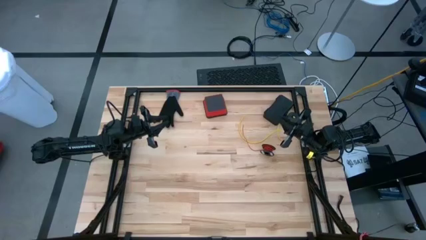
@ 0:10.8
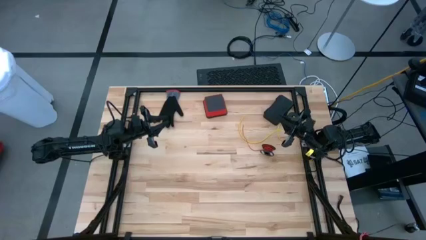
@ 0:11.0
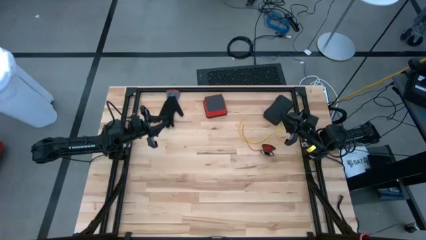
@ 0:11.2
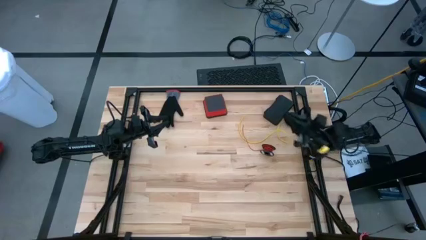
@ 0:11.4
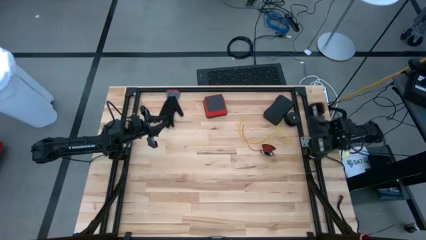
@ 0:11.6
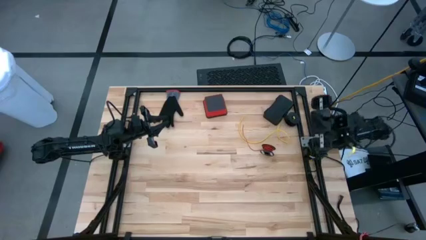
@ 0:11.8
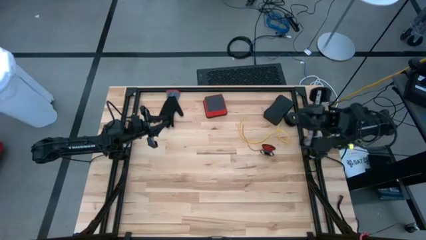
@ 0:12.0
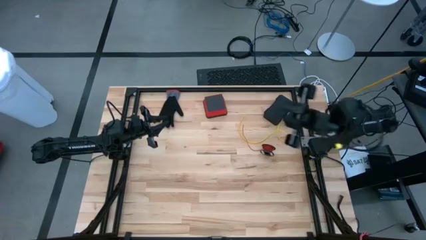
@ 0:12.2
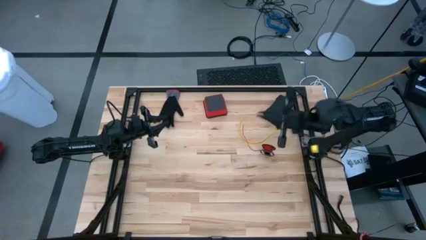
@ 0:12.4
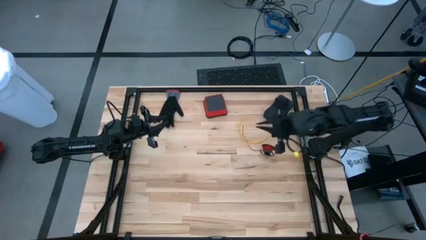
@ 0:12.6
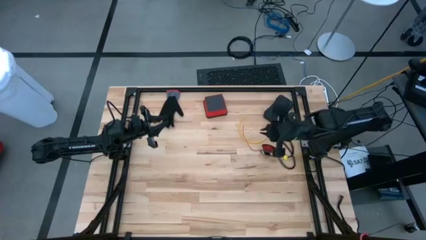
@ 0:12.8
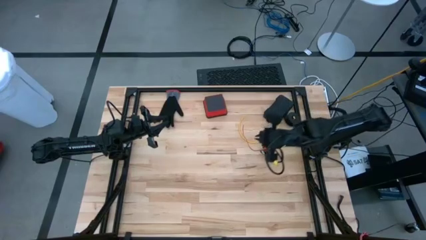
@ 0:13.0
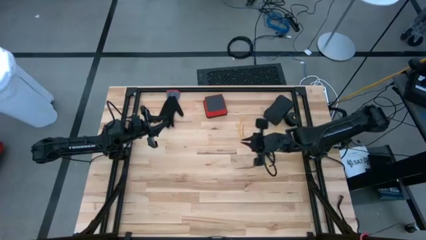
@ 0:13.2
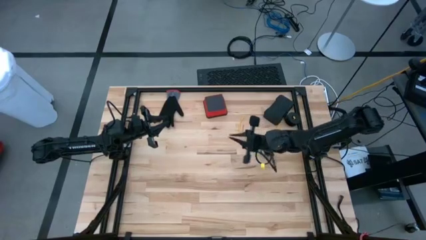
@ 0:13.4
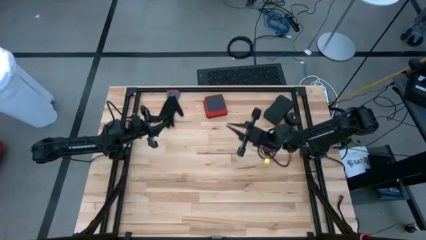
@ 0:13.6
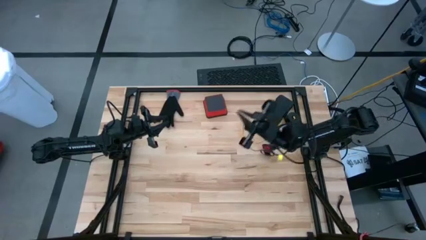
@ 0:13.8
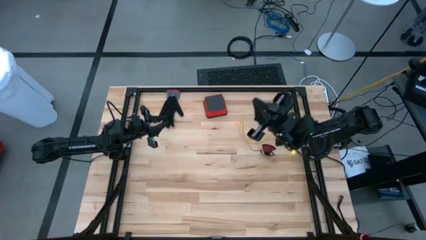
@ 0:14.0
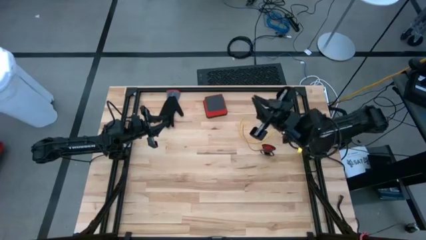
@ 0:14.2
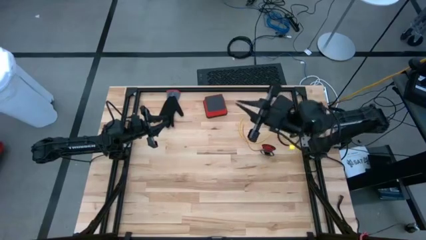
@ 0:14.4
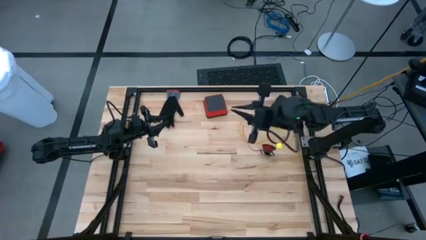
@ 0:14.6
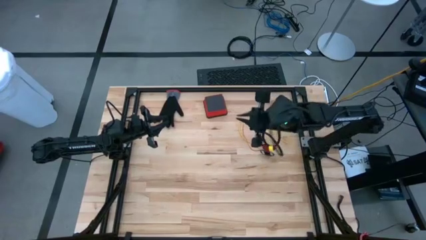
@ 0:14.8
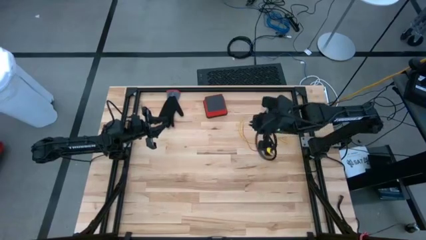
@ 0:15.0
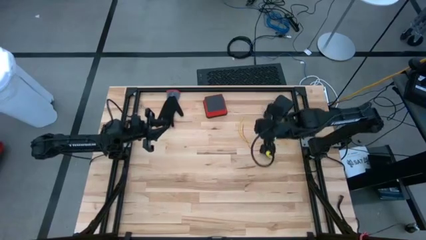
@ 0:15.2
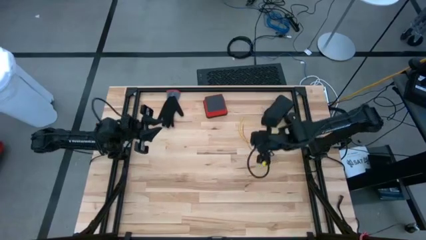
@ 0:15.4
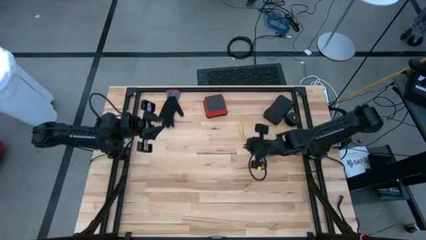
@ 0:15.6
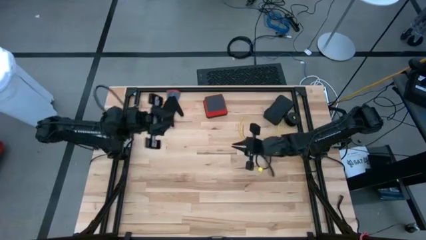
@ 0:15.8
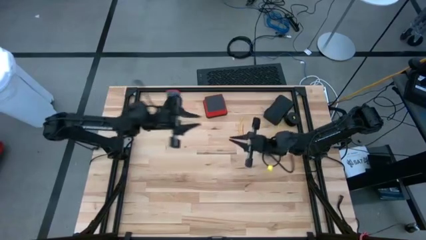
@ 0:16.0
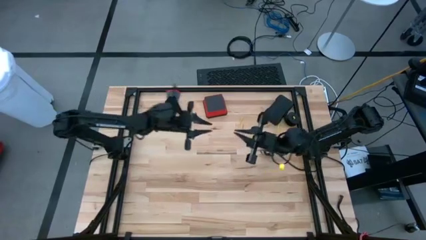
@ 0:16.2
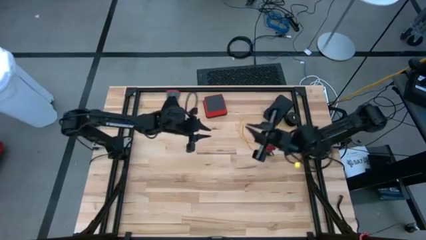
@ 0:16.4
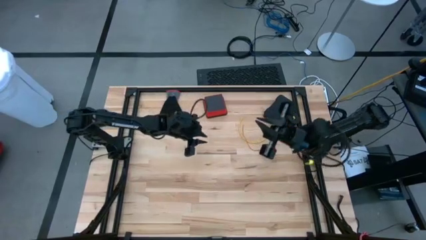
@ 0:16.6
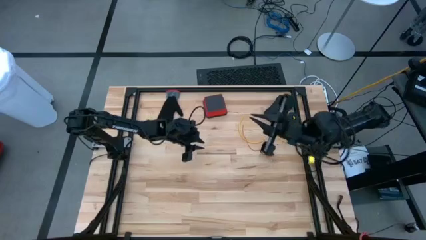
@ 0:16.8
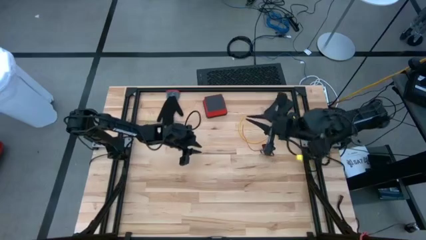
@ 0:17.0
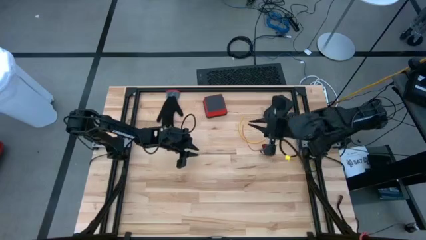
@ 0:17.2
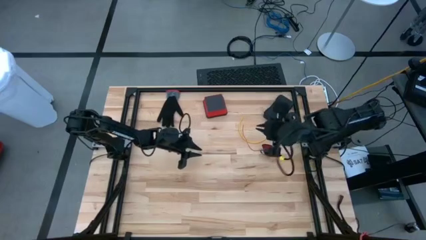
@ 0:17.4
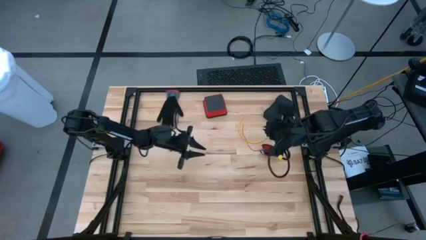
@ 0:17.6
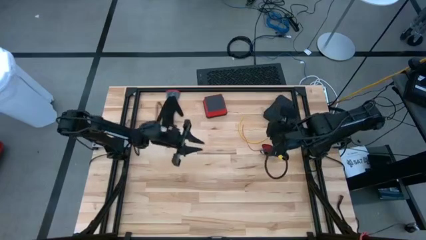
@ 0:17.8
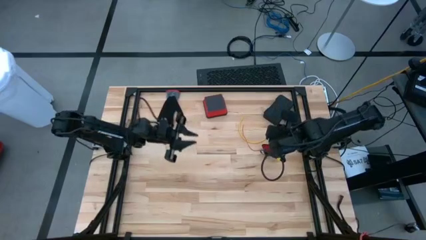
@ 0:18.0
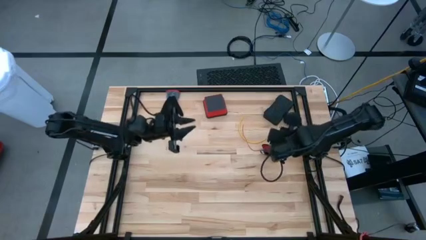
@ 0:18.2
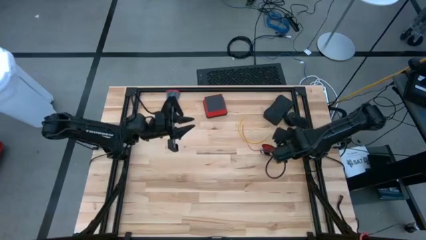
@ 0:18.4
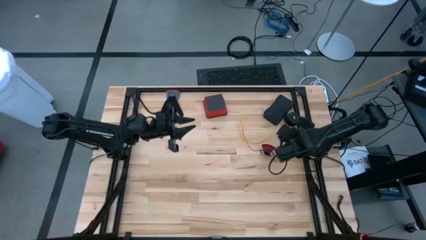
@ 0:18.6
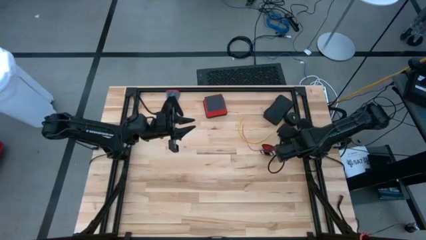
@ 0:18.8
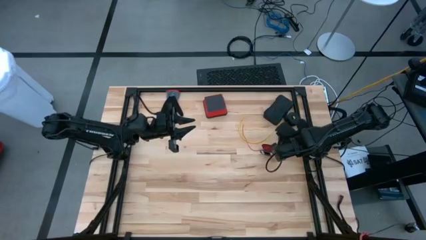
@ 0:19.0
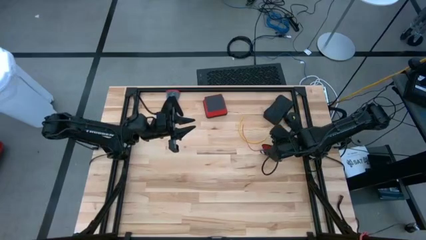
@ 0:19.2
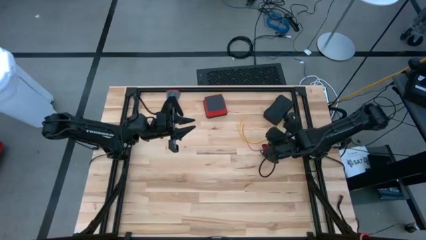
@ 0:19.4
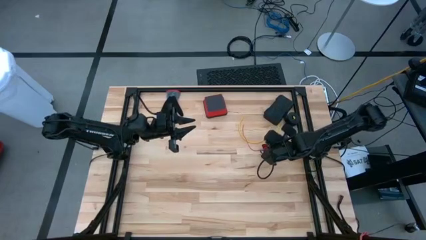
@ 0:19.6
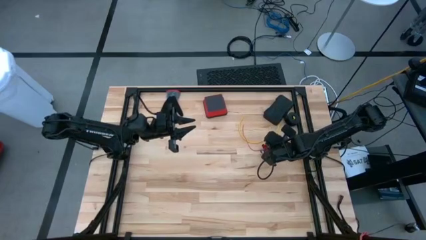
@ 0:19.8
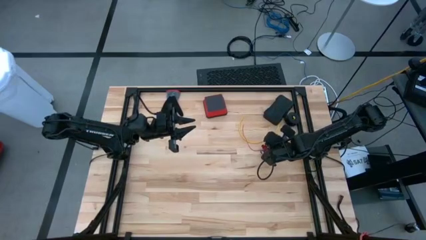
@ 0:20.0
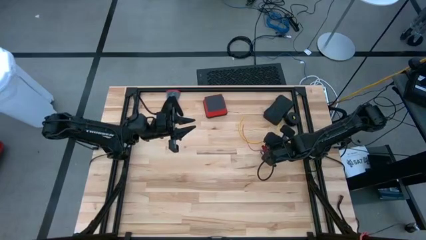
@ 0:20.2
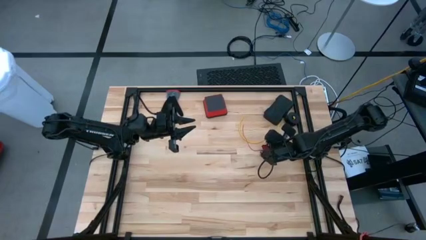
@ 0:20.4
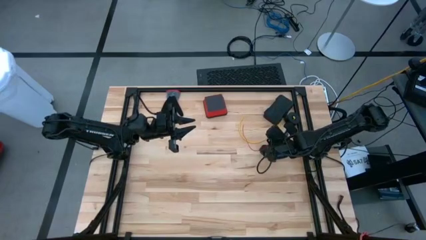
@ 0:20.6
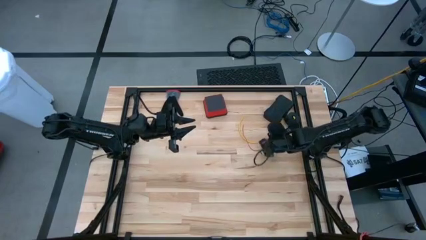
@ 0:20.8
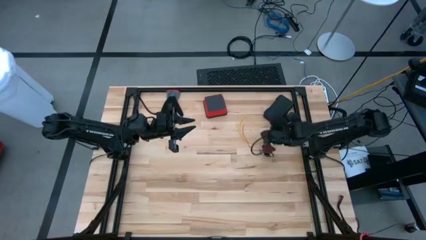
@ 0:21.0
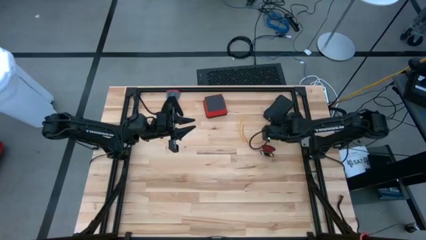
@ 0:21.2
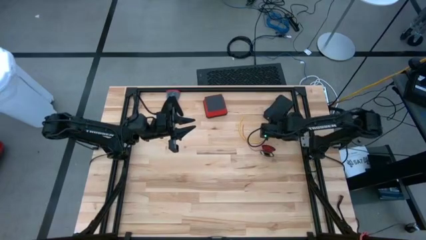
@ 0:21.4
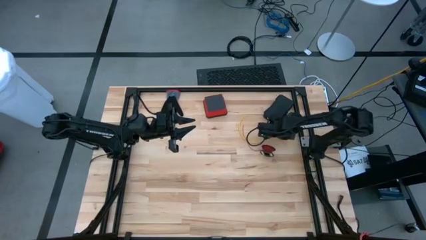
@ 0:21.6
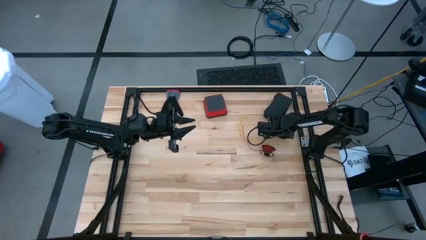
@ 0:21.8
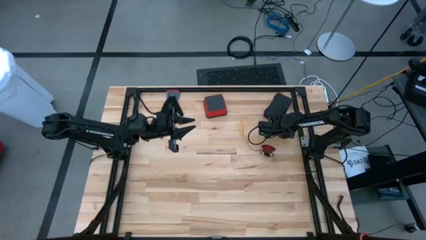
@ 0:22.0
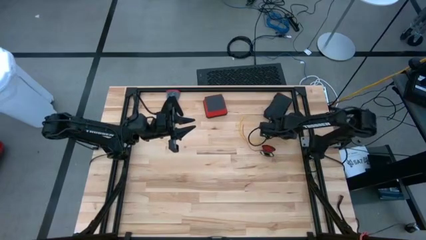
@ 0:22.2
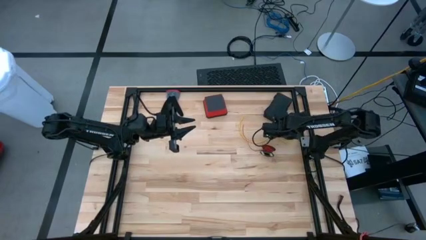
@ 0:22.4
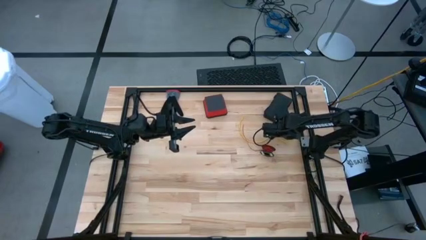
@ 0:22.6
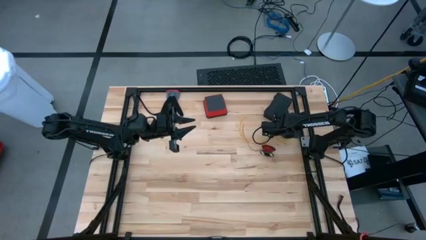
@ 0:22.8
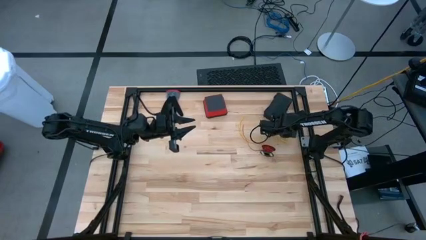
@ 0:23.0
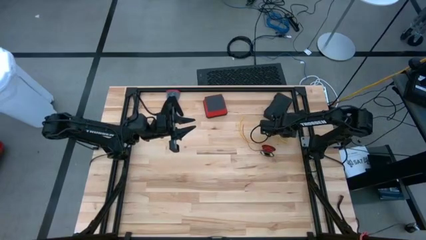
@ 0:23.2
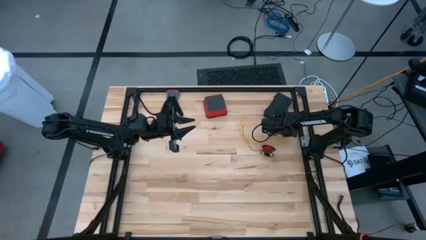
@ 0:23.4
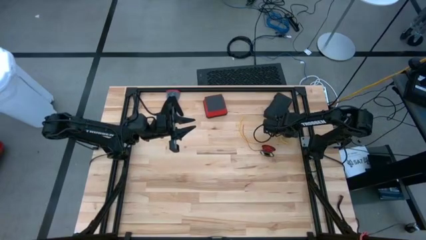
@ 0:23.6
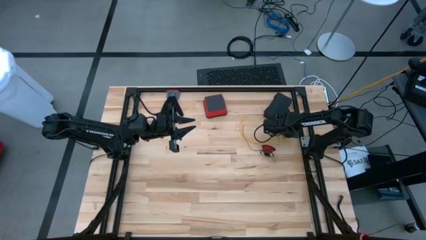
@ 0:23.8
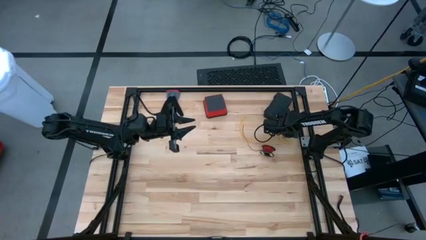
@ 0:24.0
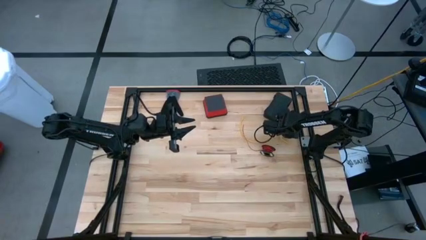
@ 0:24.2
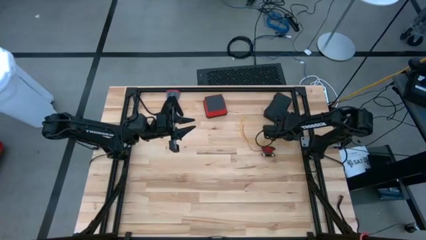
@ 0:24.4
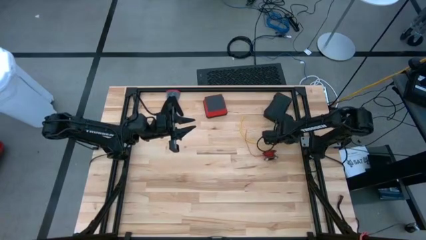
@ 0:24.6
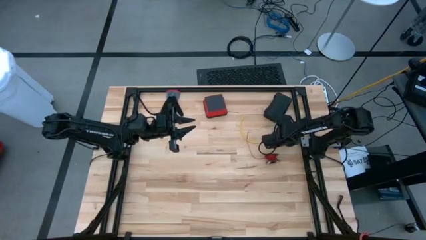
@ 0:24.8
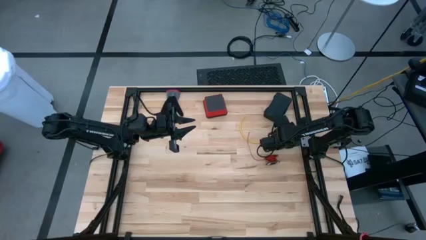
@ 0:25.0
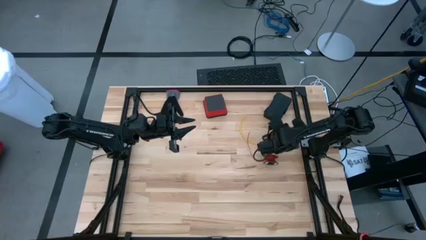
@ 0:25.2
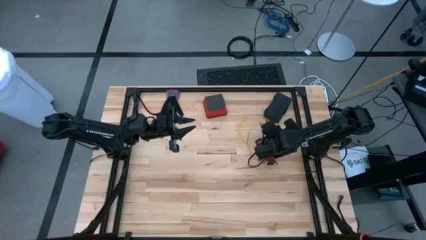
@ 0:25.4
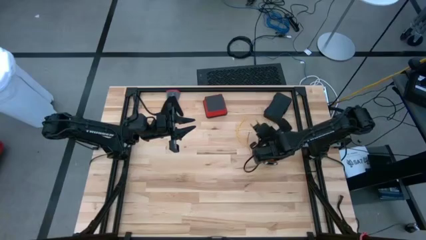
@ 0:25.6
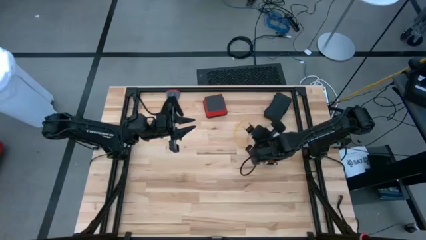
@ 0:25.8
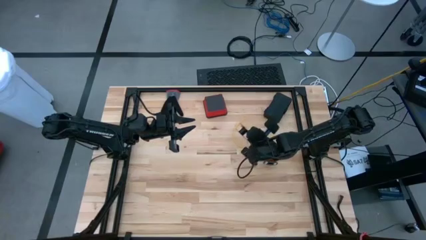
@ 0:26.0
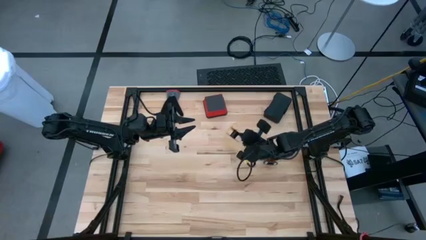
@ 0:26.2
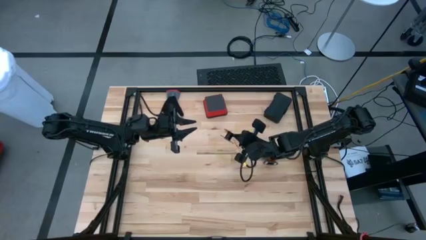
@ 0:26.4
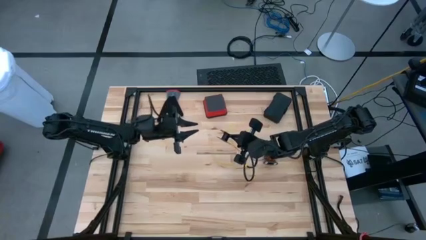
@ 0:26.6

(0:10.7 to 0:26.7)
Task: Coil cords
Coil the yellow wire onto the spool
